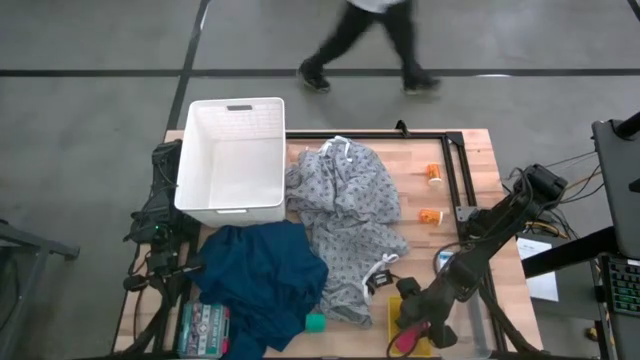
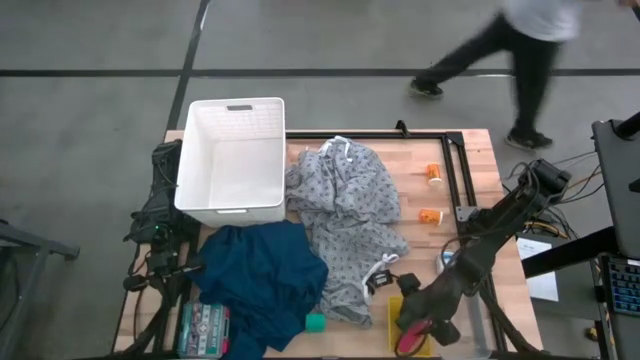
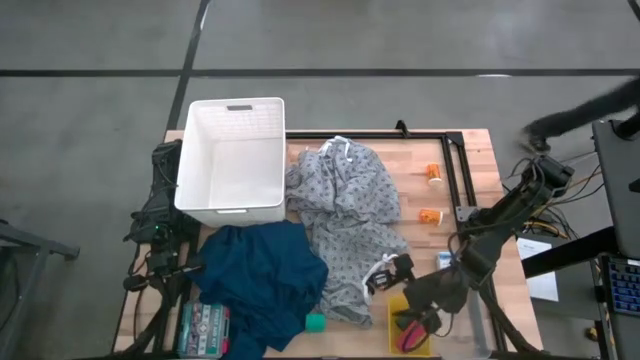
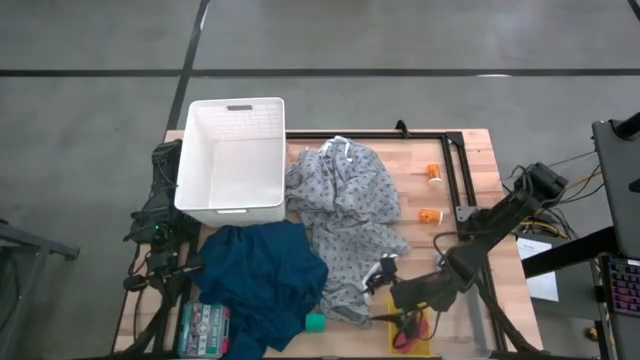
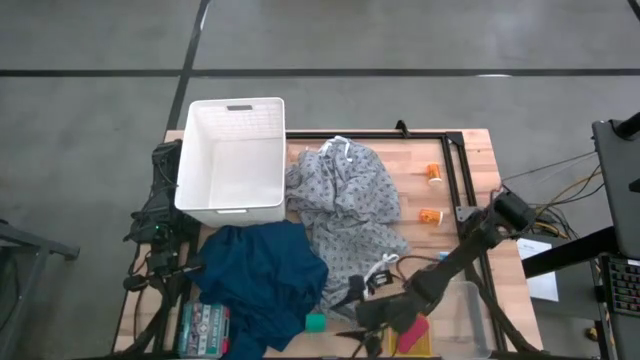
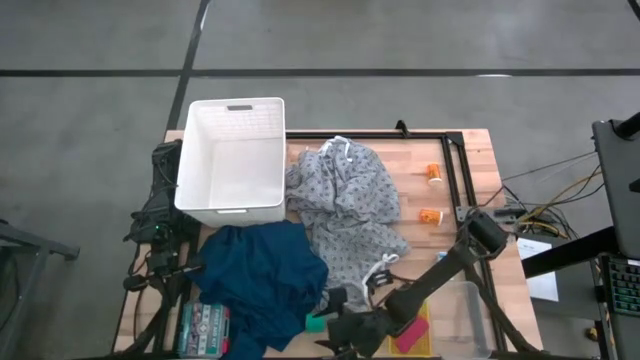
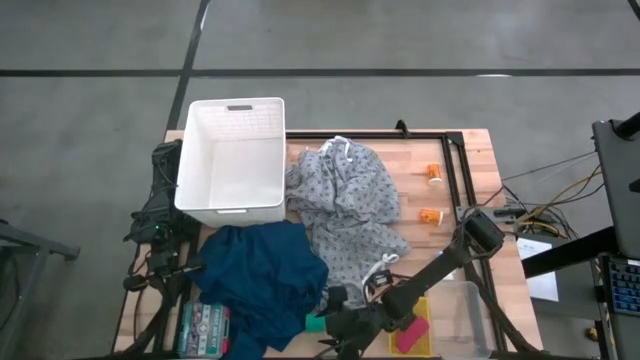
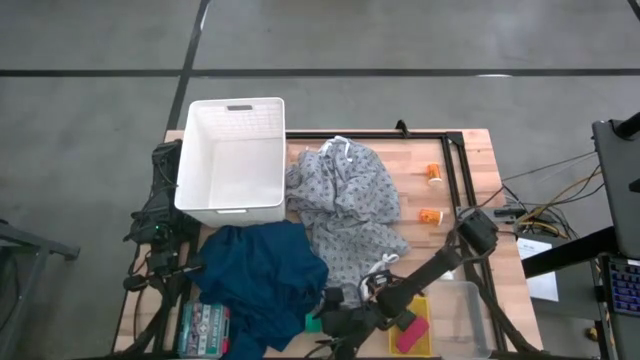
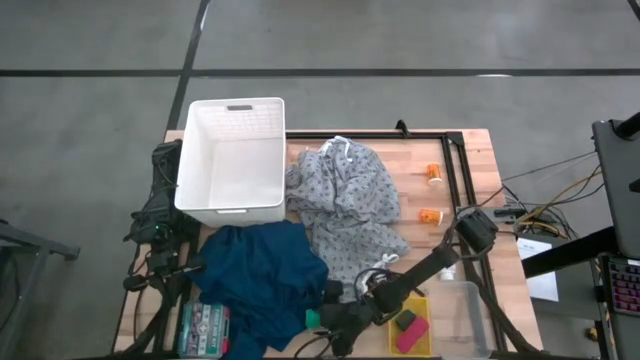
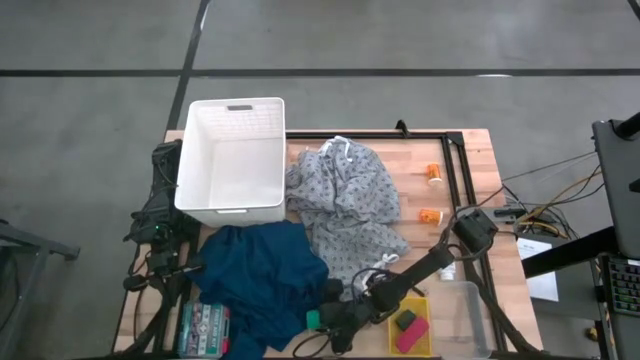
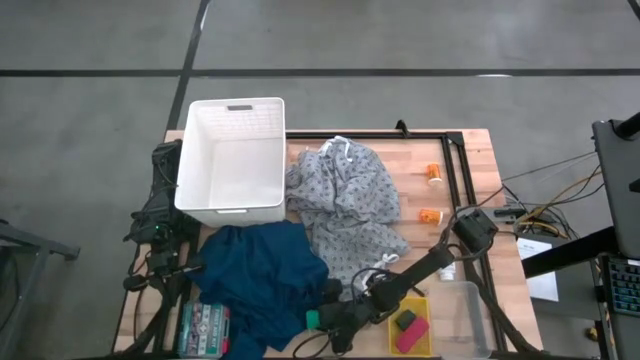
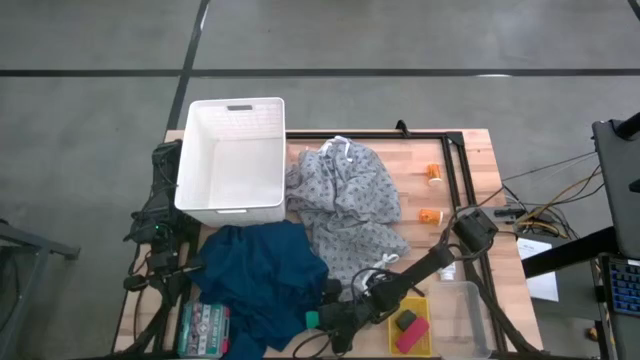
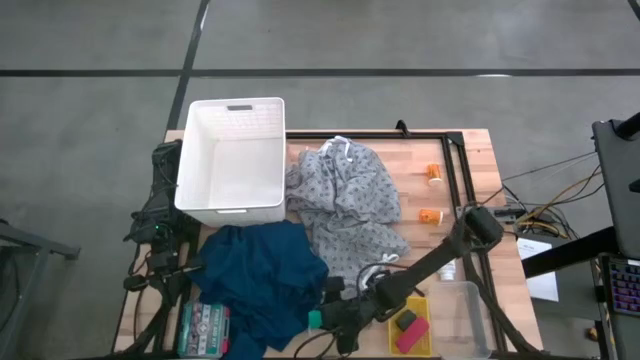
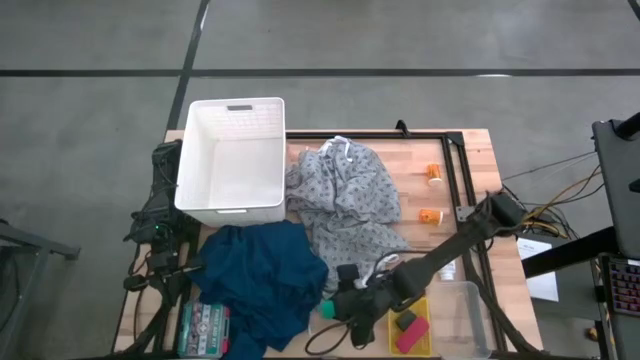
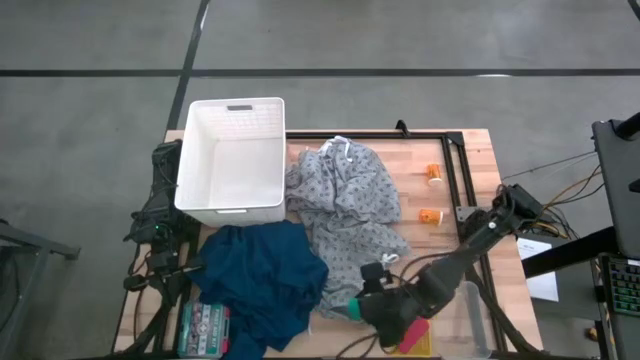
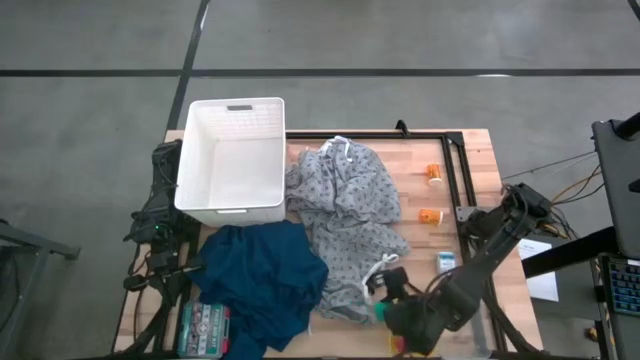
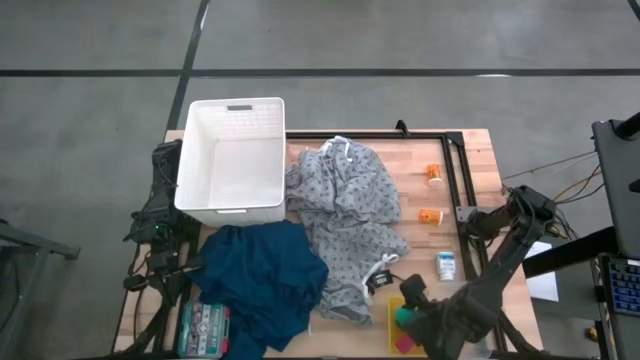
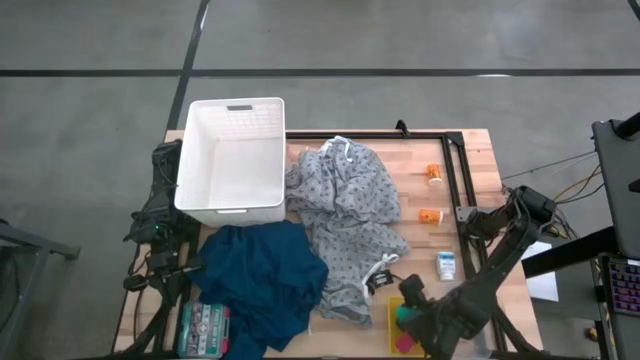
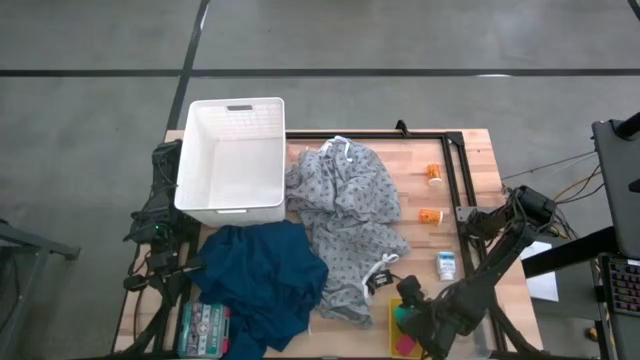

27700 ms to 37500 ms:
Task: Pick & Place Medicine items
Put the green bandage into the yellow bin

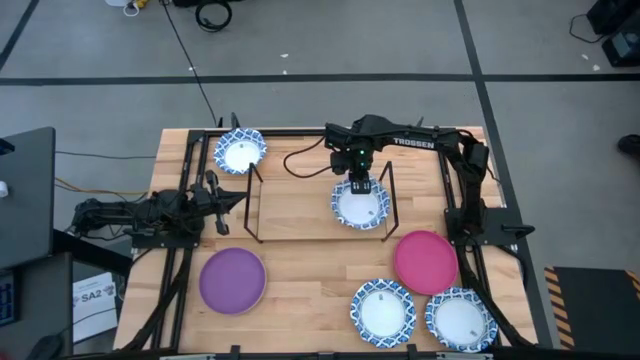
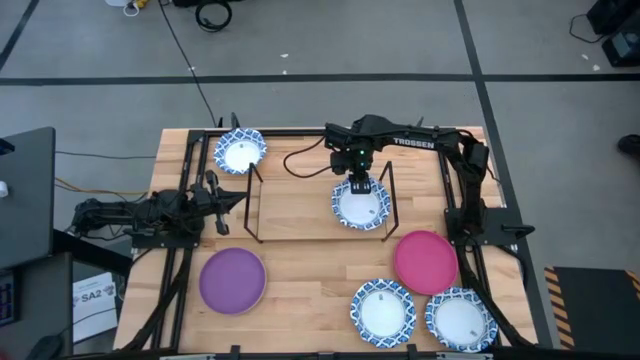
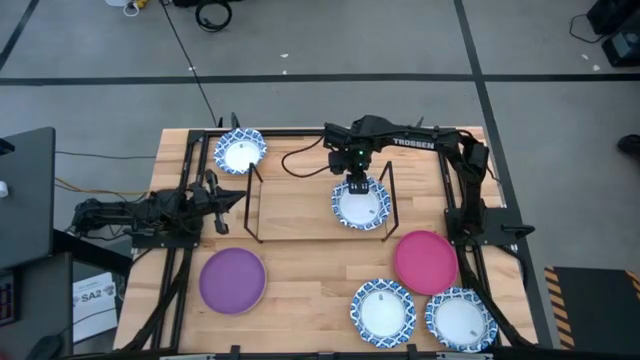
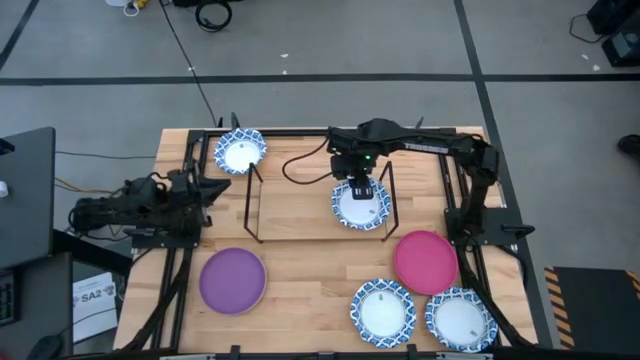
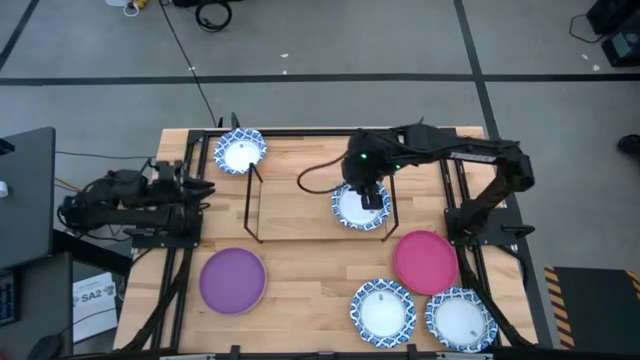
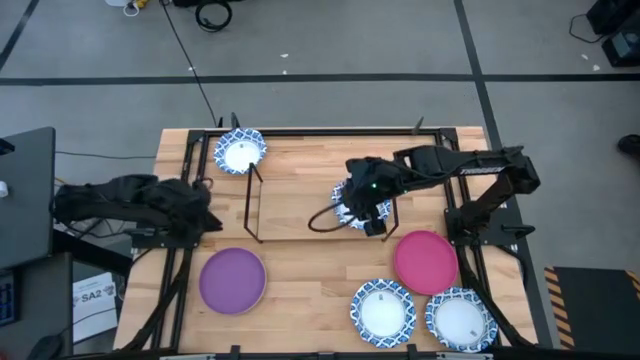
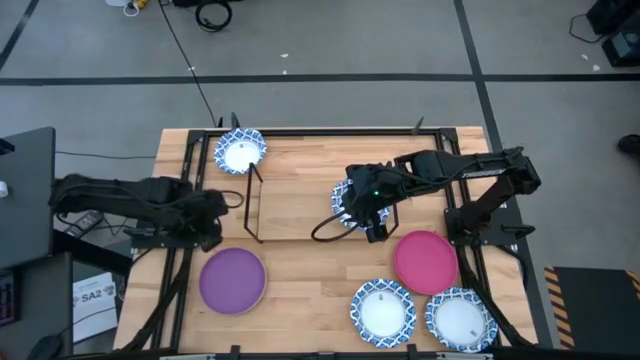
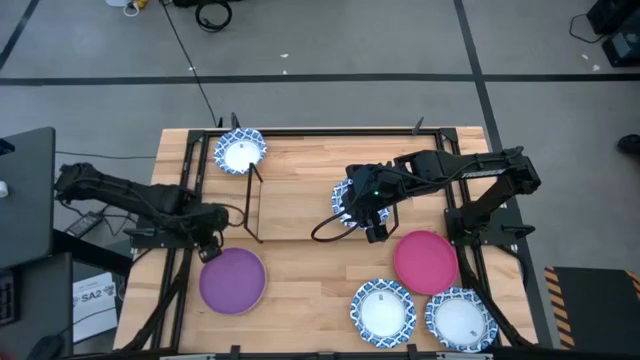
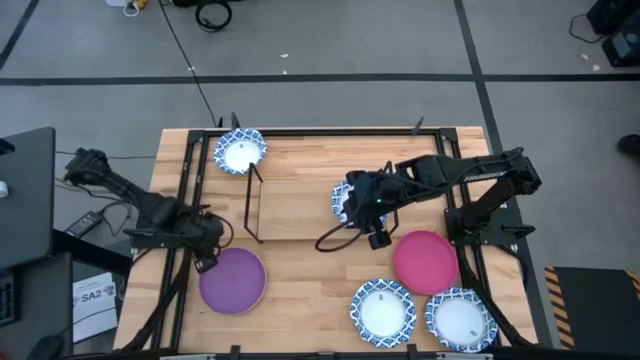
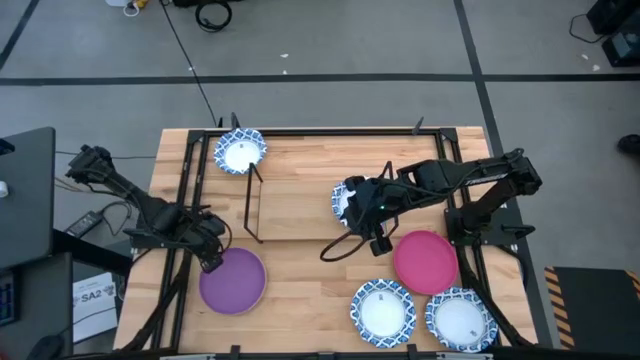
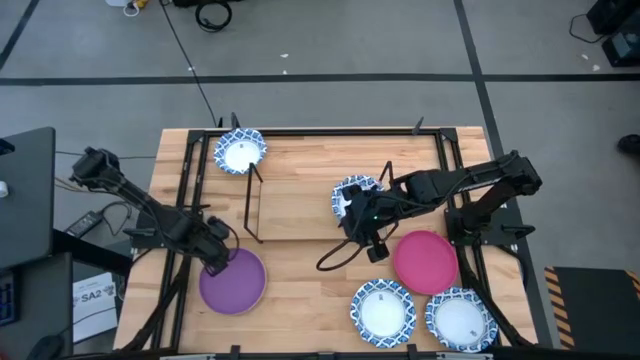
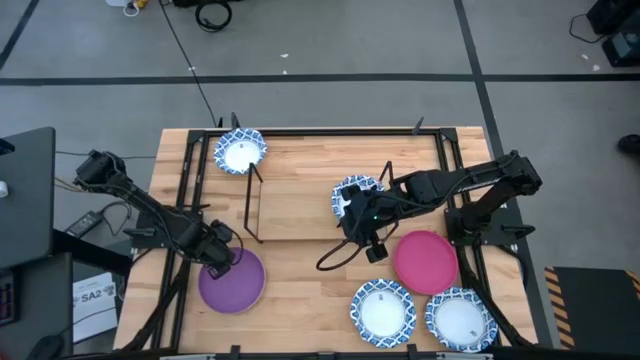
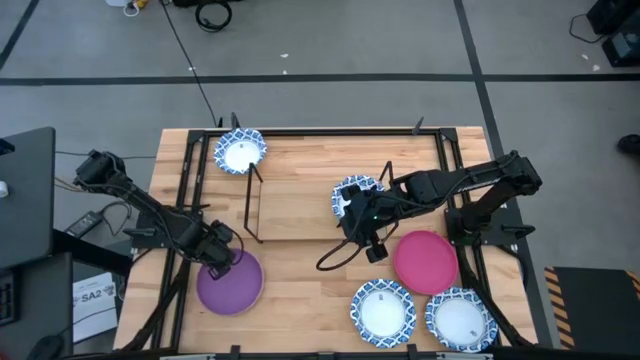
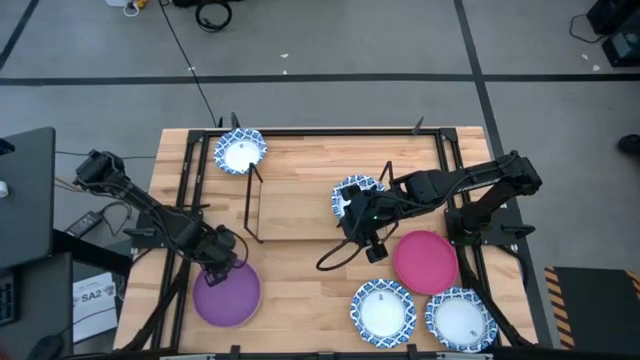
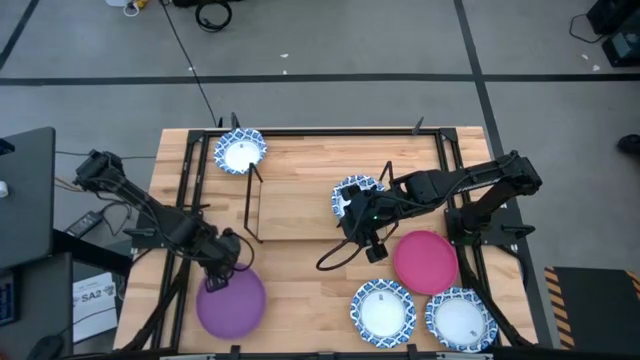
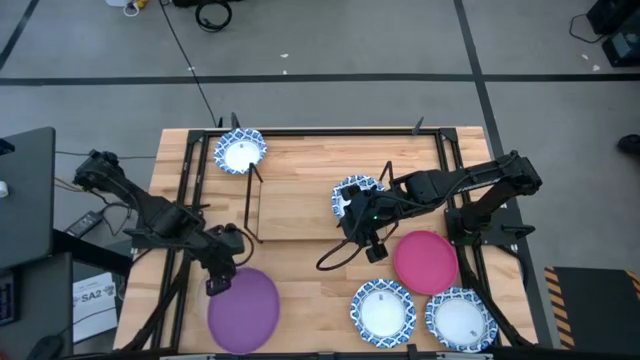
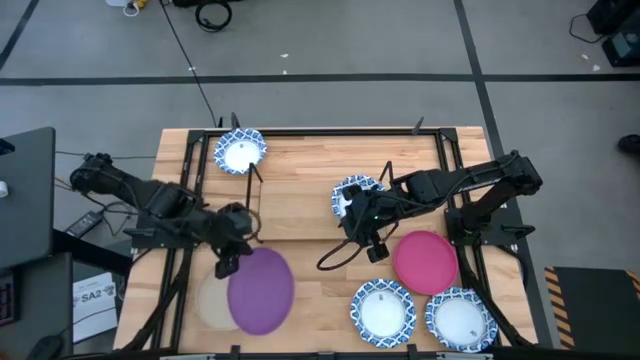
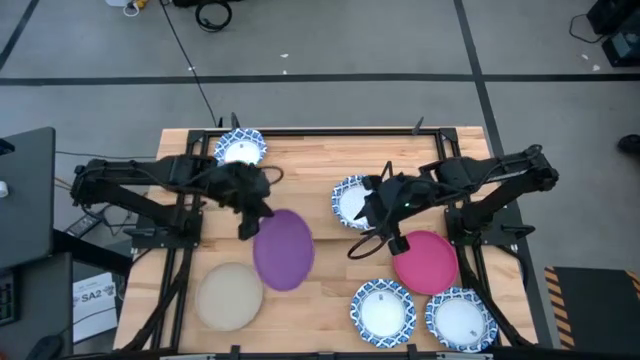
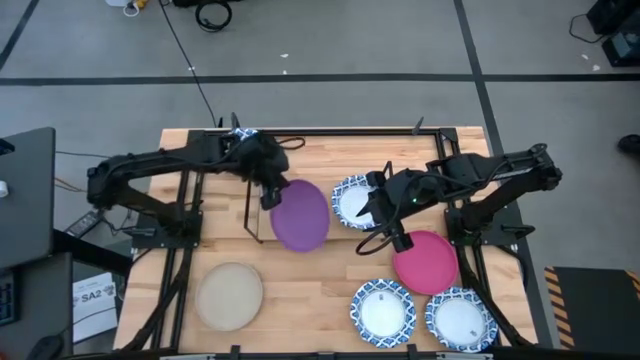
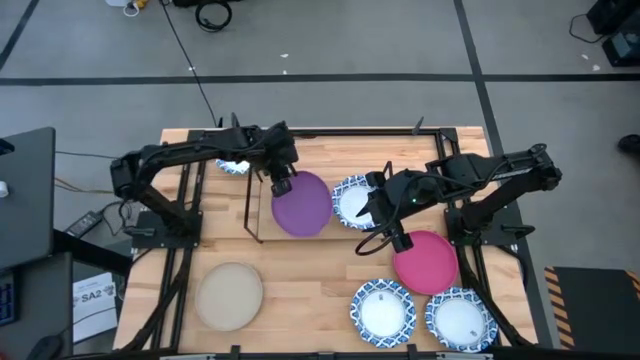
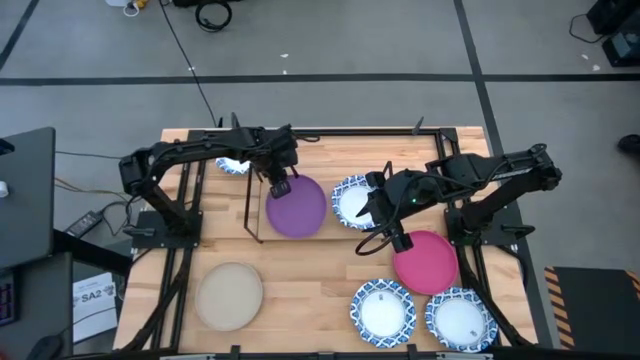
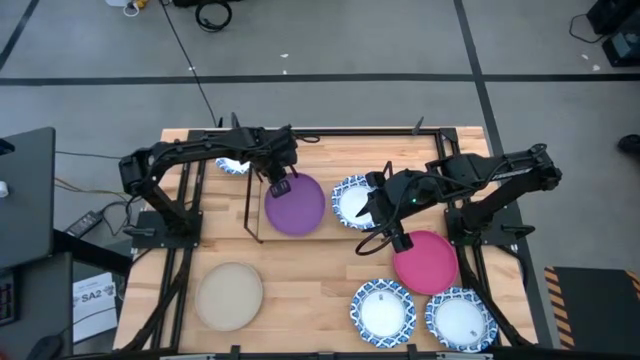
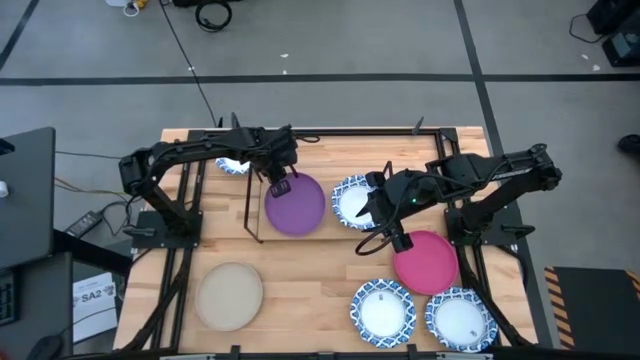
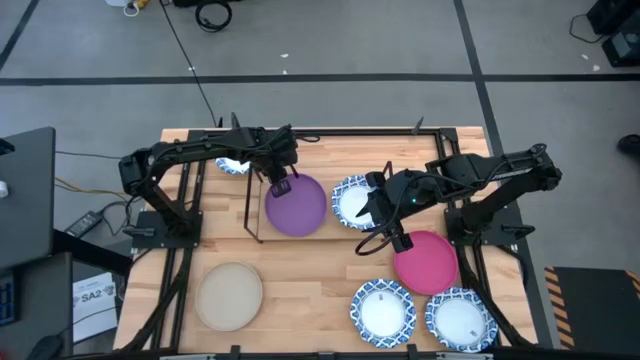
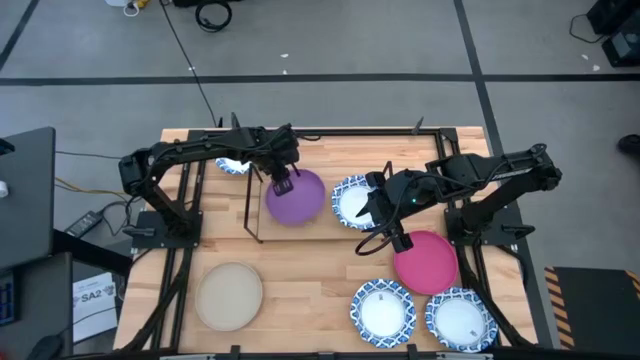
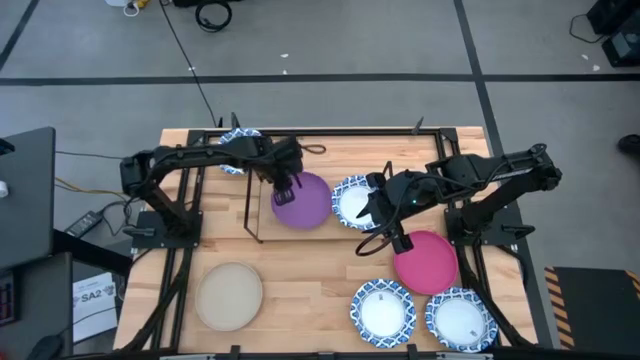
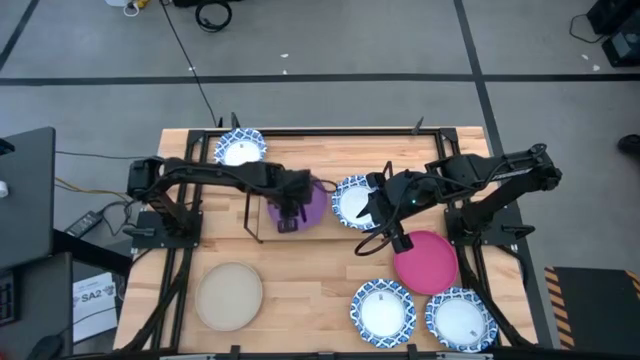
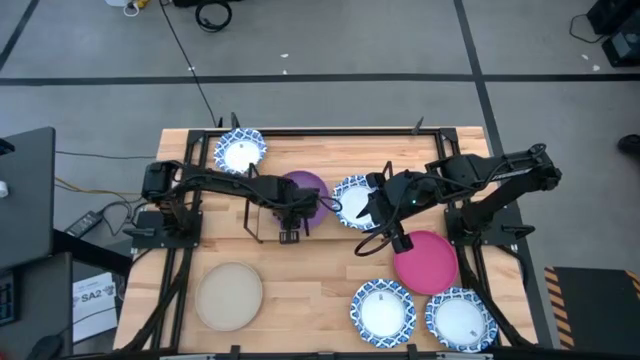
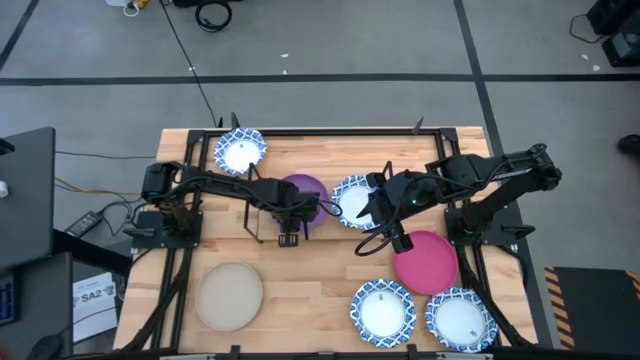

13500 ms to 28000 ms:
Task: Place and stack plates onto a shelf
Put the purple plate on the shelf
